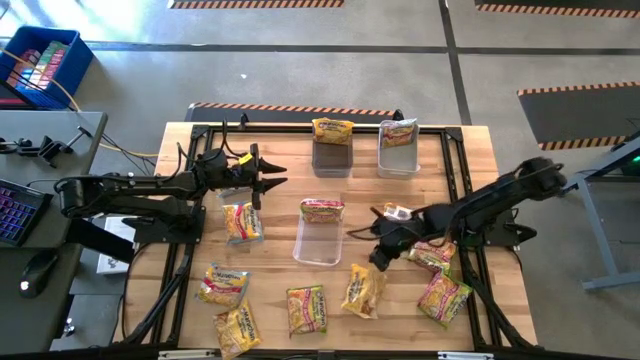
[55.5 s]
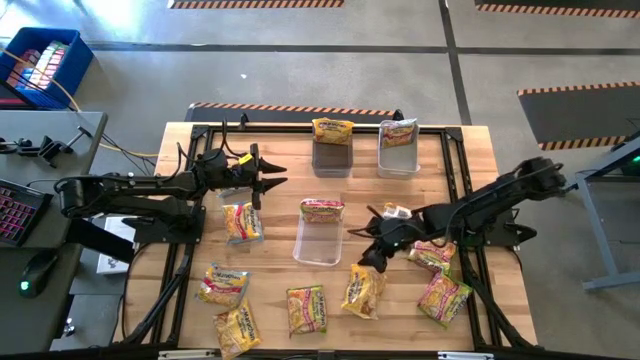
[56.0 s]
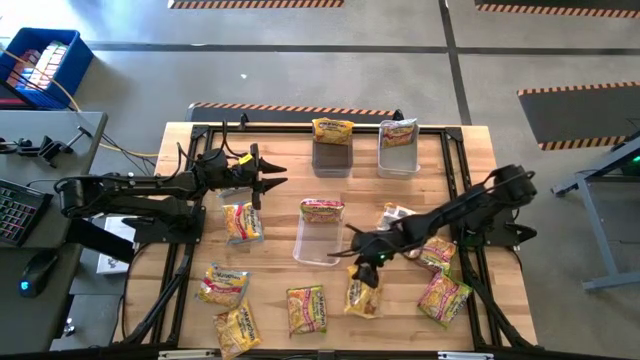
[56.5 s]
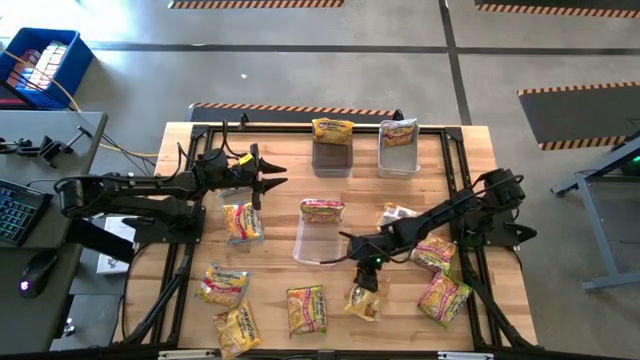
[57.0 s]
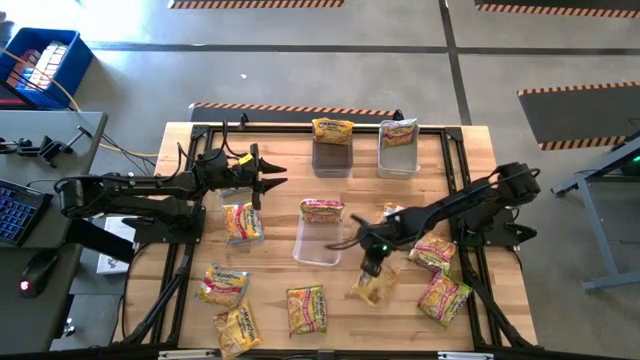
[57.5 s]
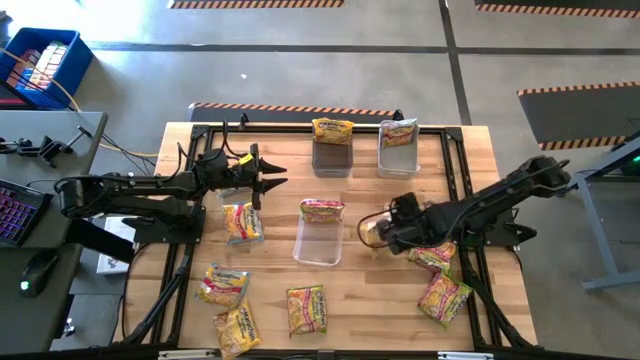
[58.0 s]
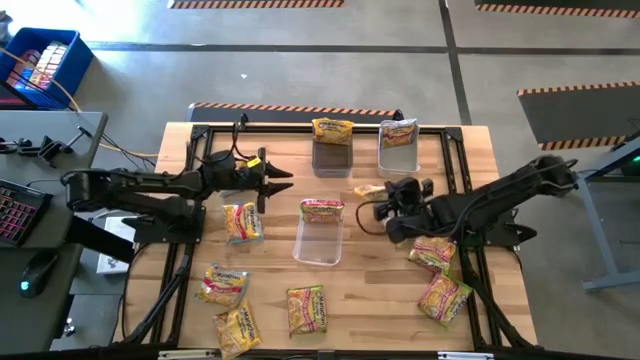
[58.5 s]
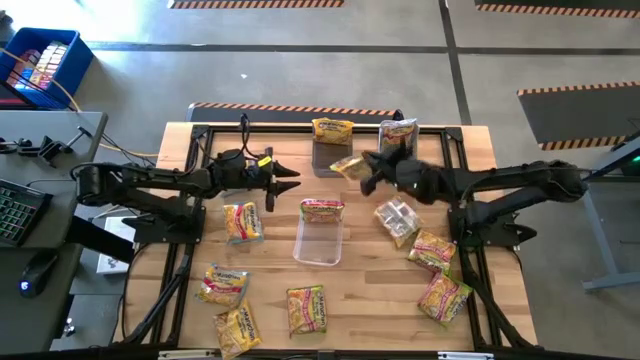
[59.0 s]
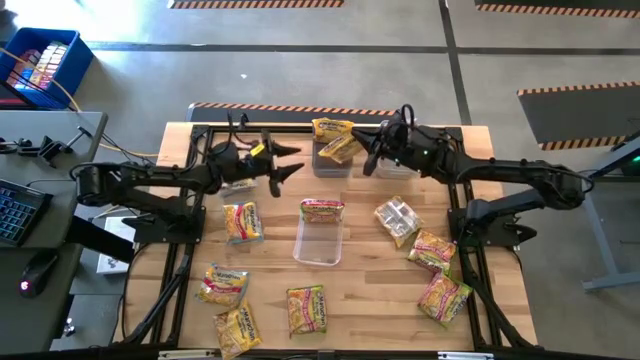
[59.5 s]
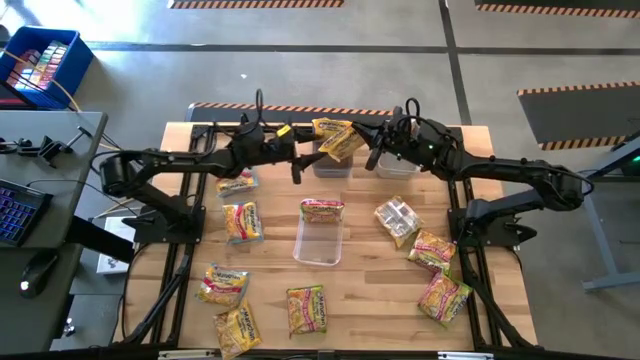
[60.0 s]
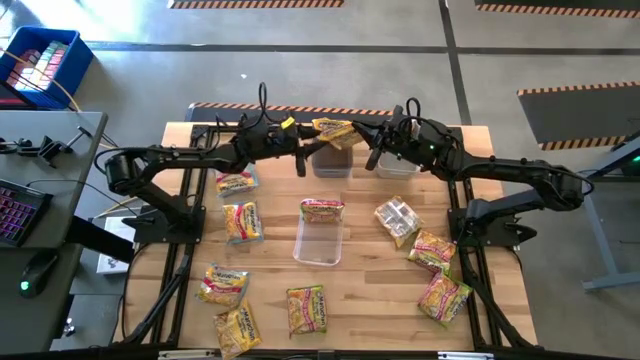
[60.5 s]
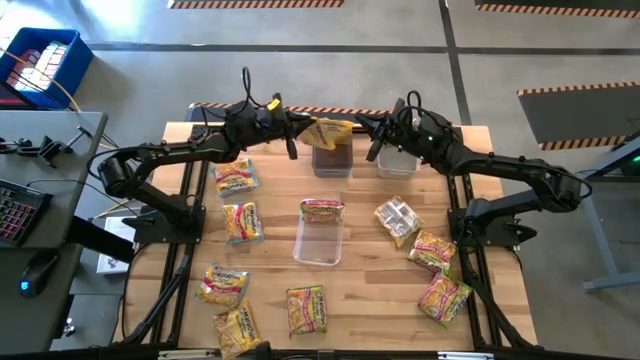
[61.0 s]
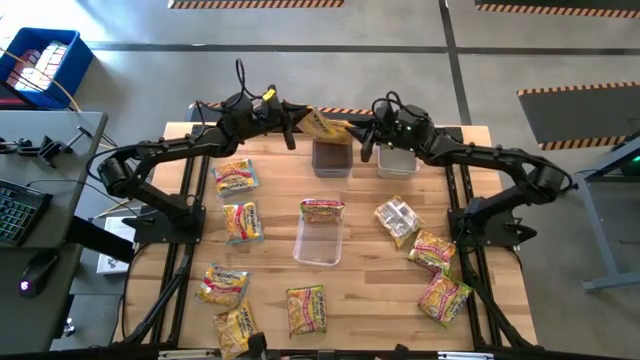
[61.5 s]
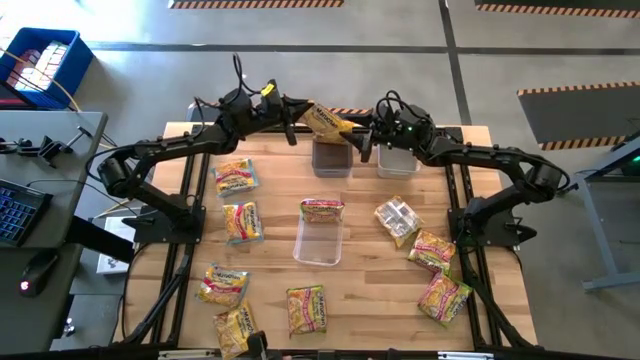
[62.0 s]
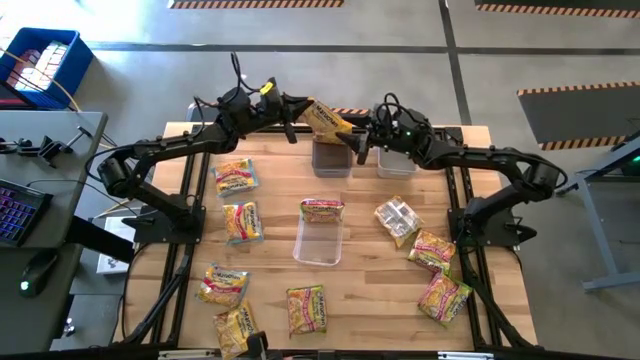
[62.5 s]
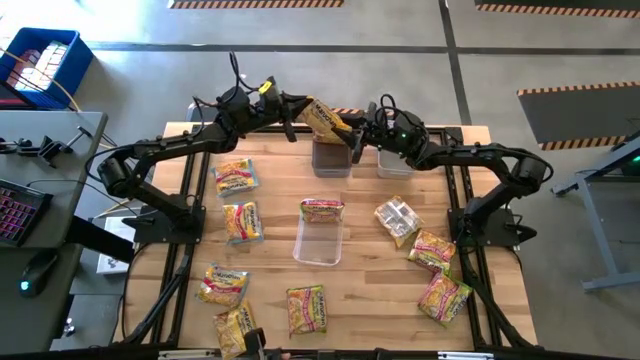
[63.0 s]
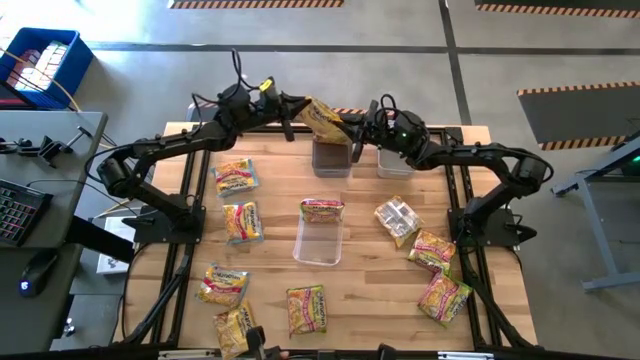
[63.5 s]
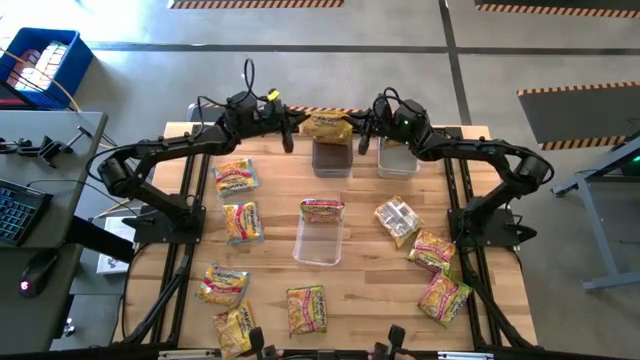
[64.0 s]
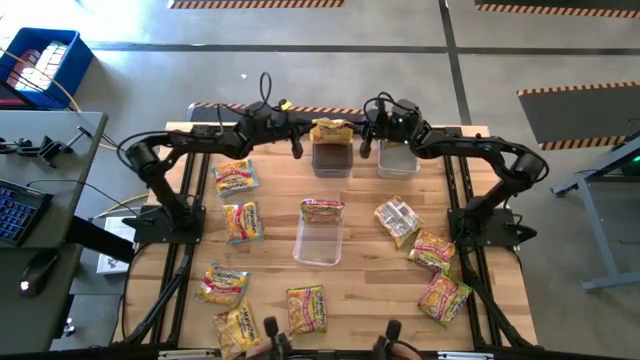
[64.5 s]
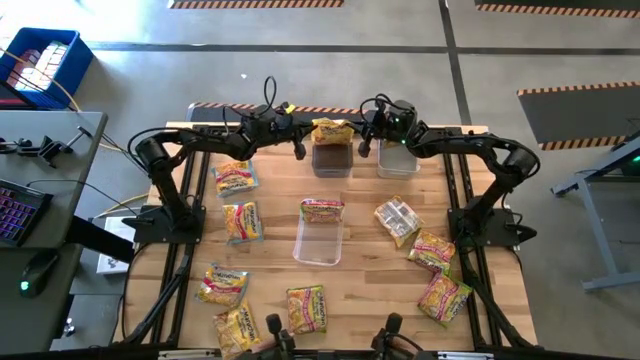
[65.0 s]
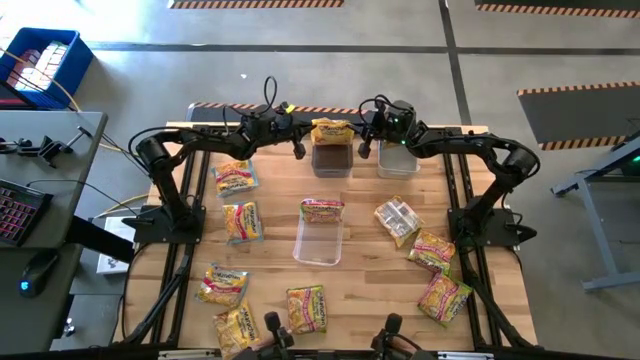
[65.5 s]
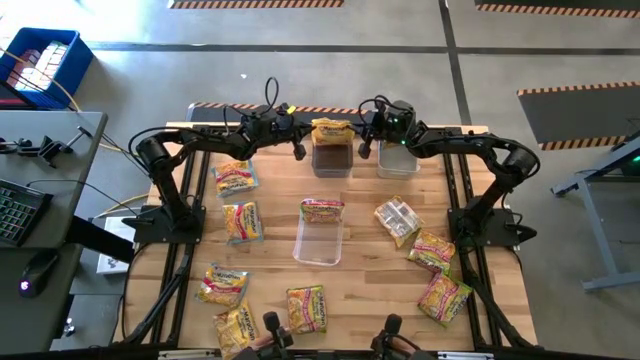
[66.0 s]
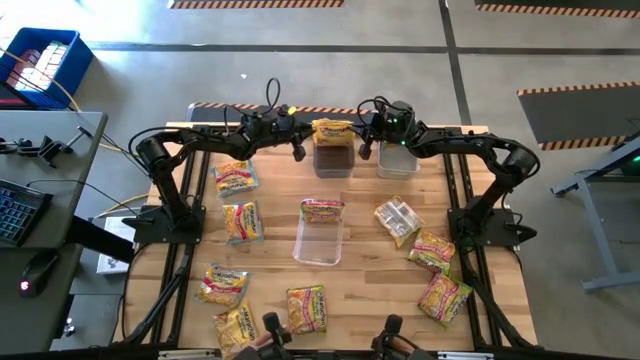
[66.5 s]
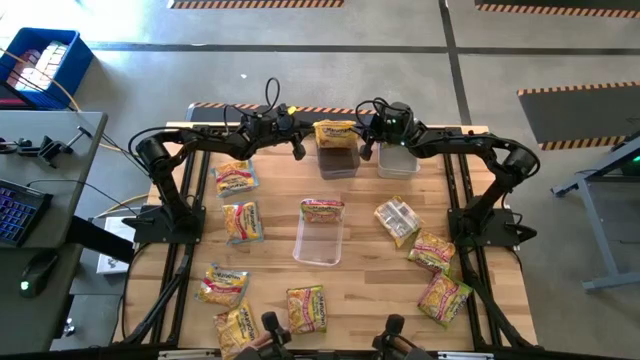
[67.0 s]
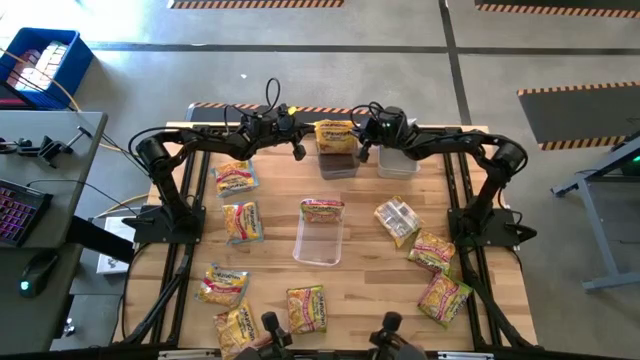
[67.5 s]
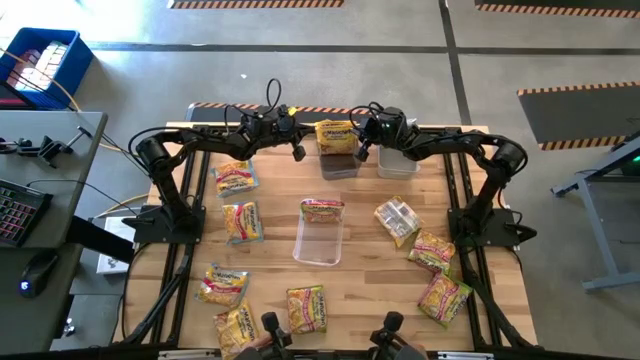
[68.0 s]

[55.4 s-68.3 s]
Task: Sort Maruchan noodles
Put the yellow noodle pack into the black bin

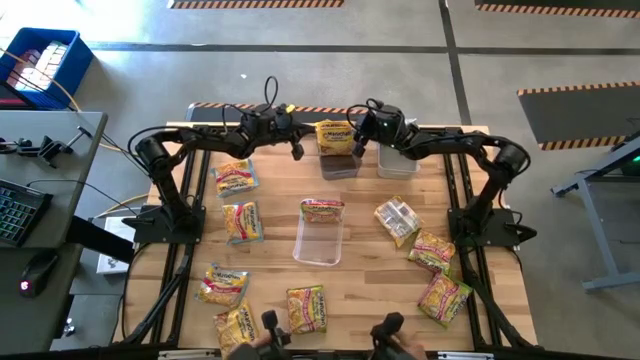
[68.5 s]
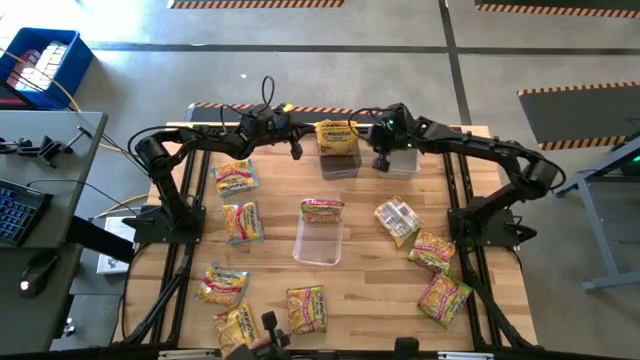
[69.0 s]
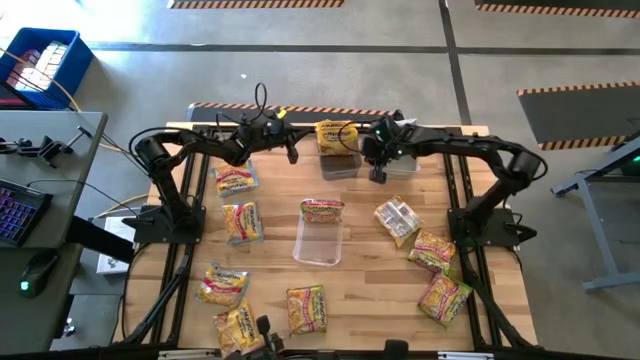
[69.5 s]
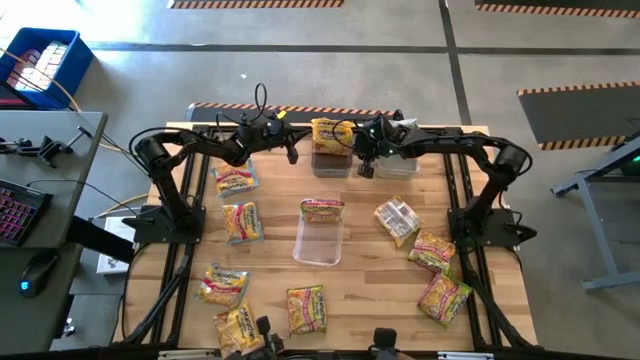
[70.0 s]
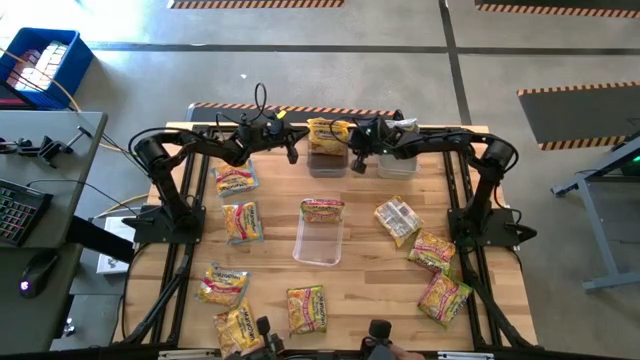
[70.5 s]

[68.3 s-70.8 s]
Adjust the black bin

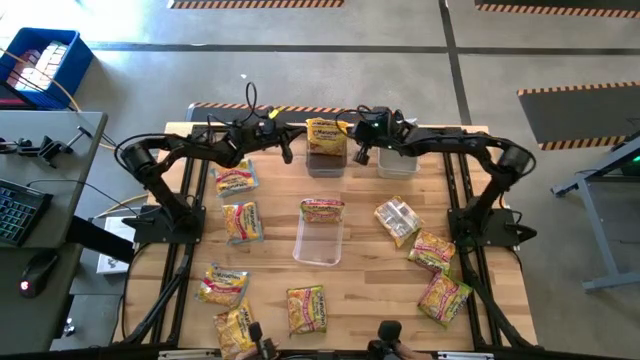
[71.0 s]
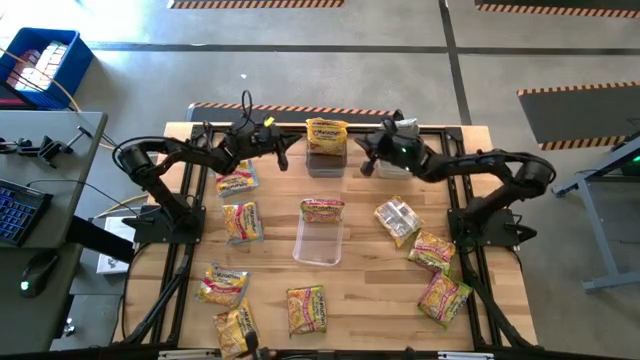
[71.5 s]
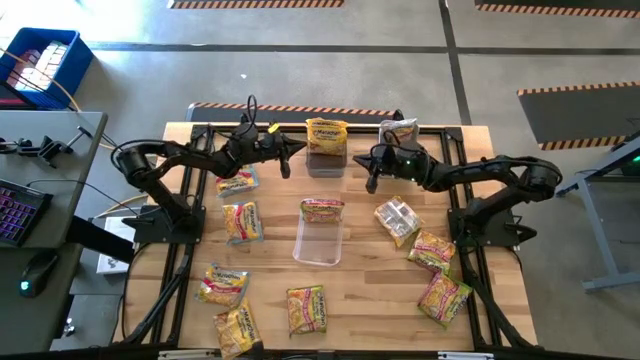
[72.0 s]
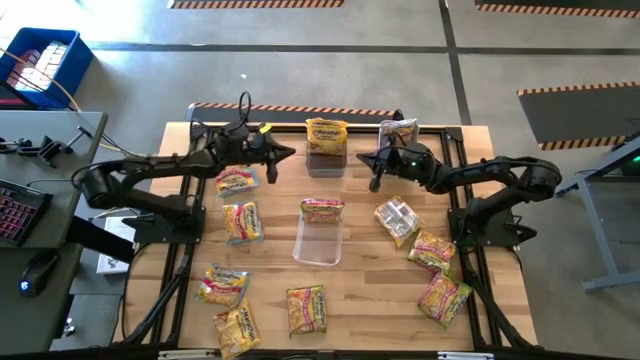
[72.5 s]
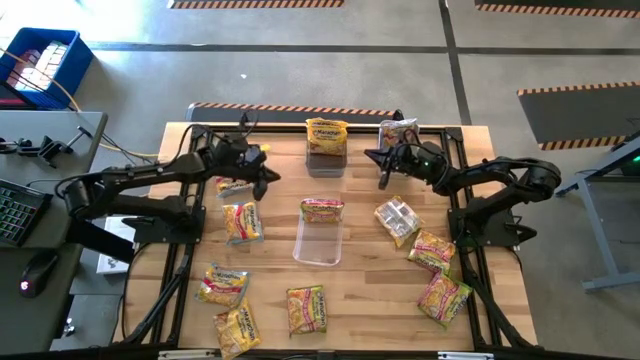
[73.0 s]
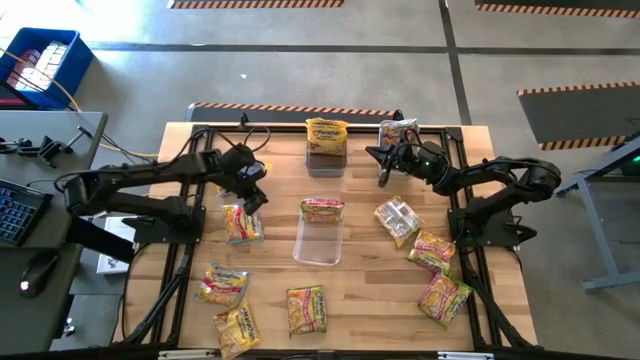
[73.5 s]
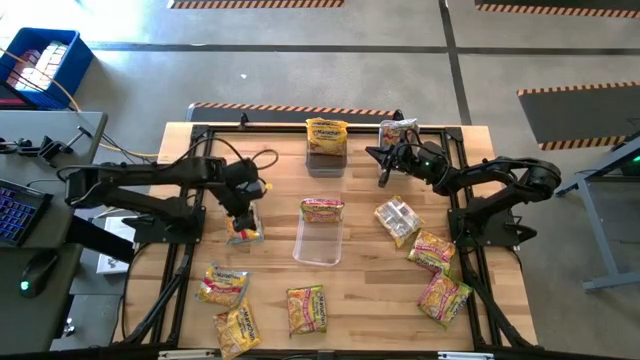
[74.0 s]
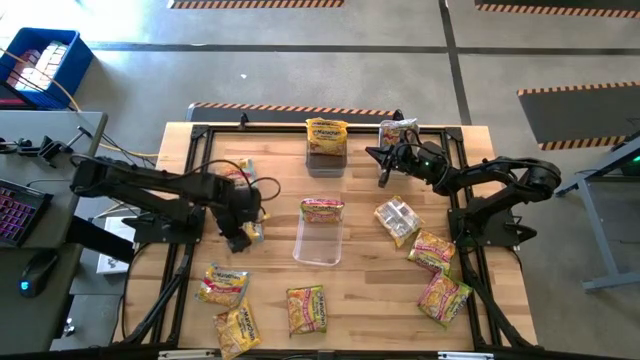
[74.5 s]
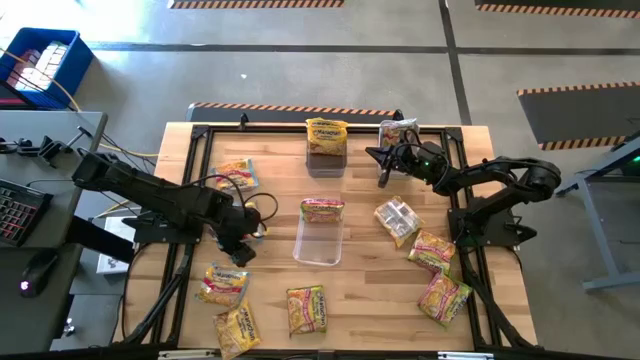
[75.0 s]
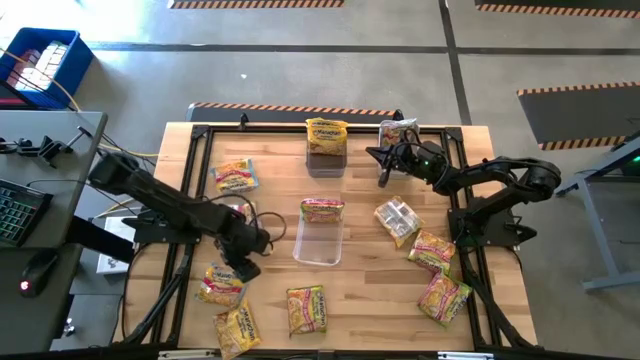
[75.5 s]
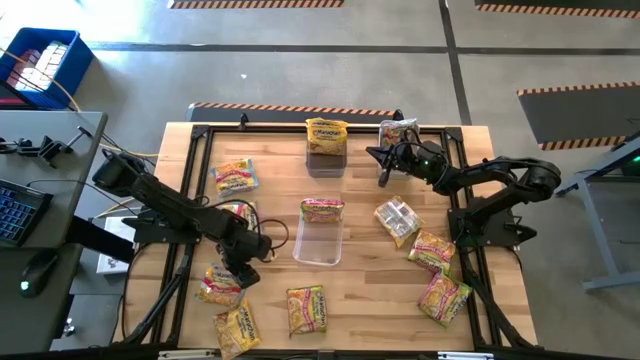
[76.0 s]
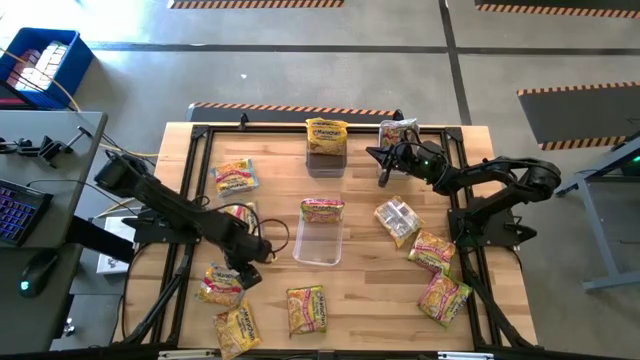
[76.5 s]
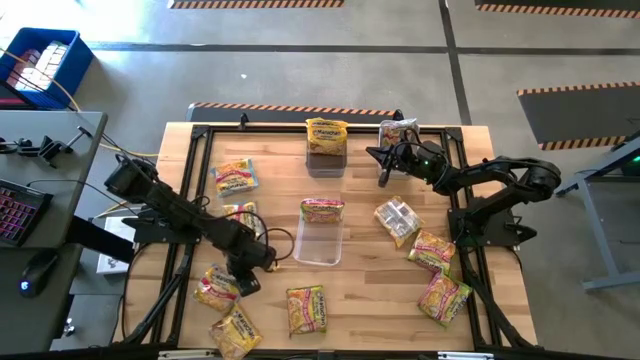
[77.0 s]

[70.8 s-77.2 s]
Put the blue noodle pack into the white bin
